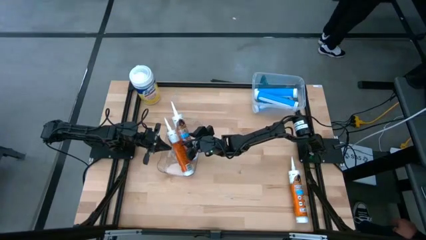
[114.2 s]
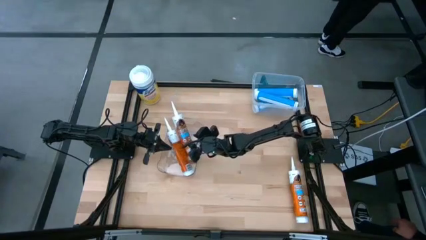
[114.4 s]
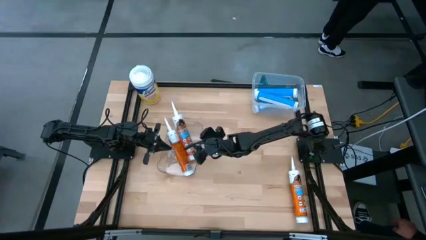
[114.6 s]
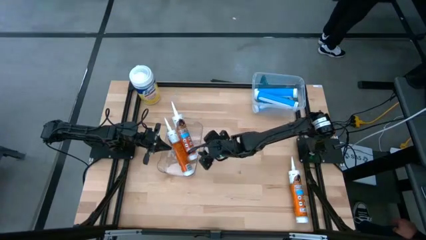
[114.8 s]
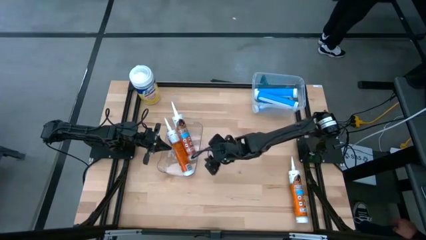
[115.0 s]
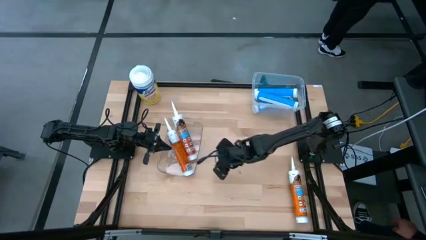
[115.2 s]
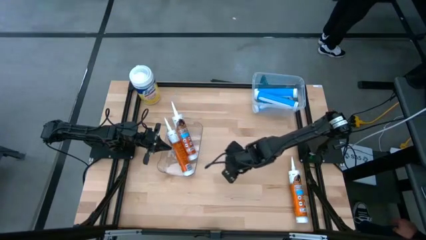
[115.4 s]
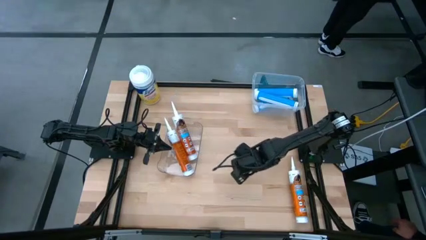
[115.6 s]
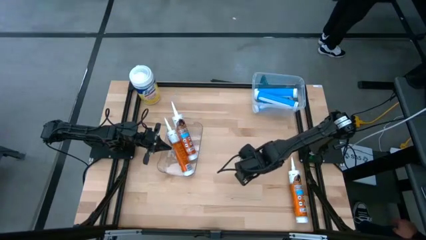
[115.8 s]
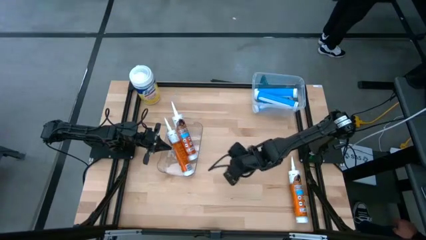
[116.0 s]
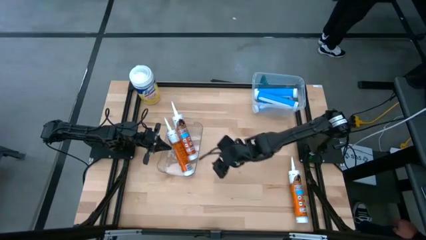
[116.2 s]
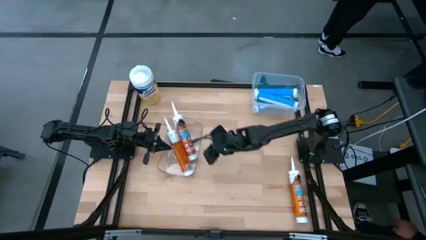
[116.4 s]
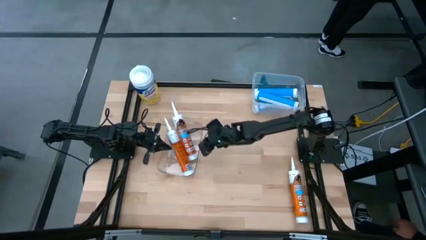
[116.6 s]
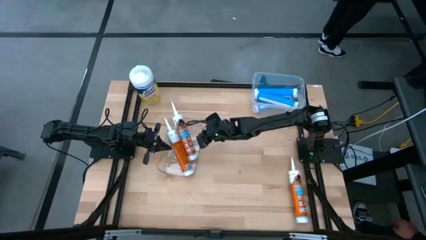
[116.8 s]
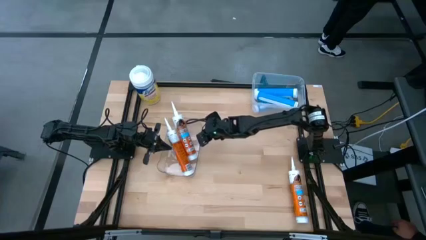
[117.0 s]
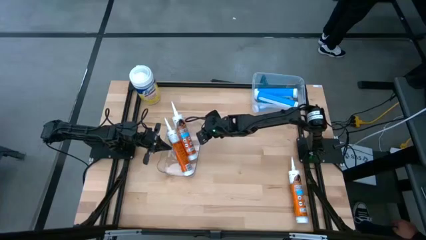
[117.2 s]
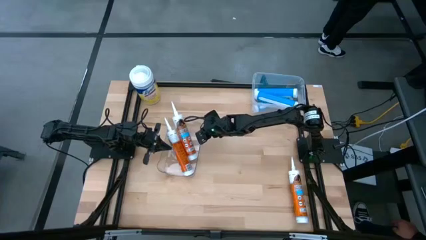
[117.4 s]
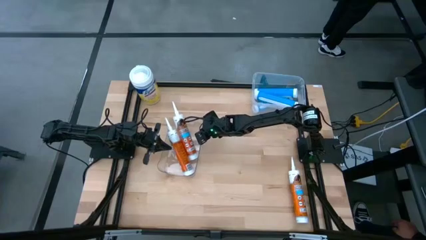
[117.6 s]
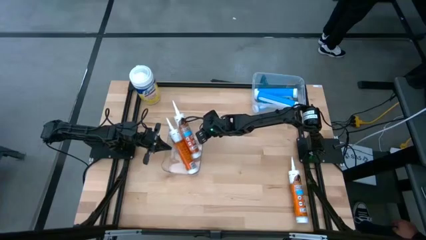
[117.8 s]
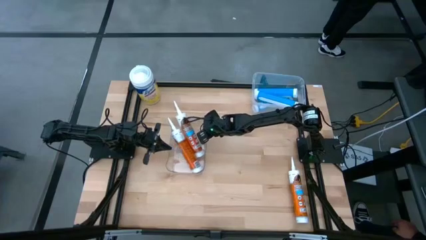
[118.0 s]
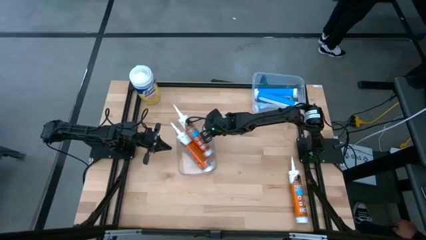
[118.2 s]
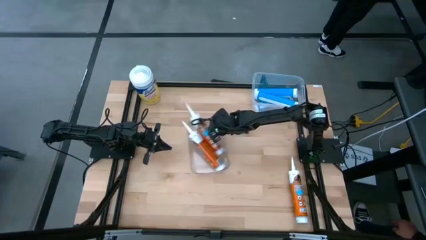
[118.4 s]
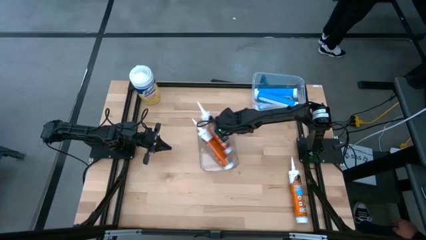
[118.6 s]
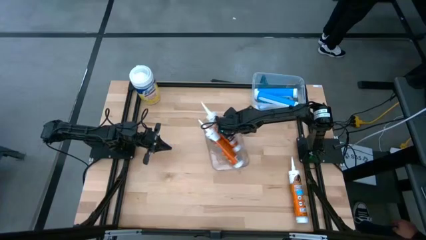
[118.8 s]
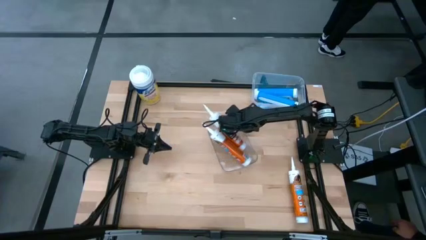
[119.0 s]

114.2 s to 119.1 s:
Task: Pick & place silicon tubes, Sealant and Lysol wipes
Move the transparent bin to the bottom left of the white bin

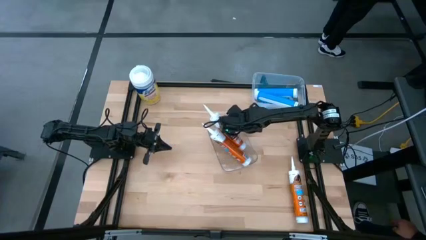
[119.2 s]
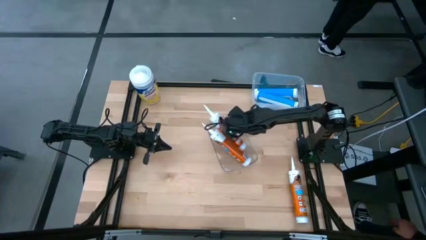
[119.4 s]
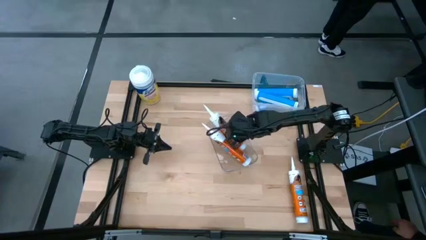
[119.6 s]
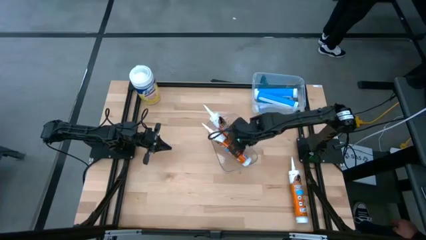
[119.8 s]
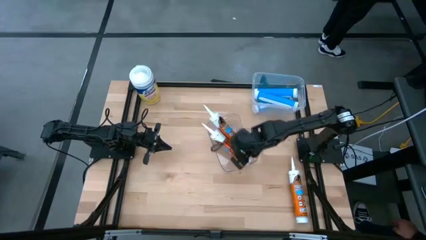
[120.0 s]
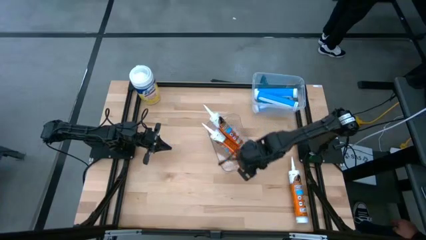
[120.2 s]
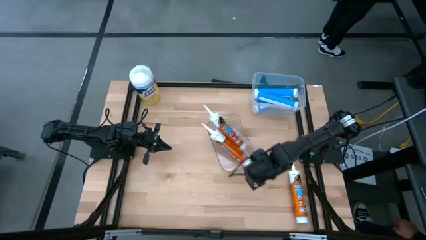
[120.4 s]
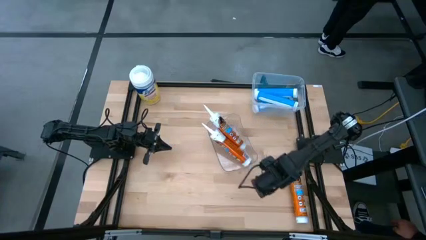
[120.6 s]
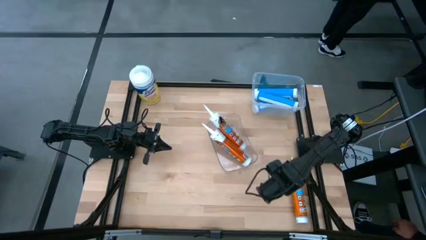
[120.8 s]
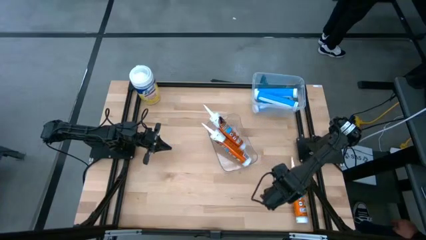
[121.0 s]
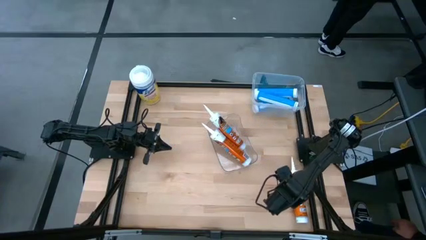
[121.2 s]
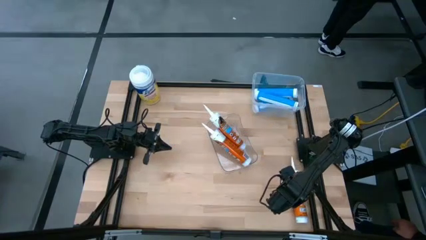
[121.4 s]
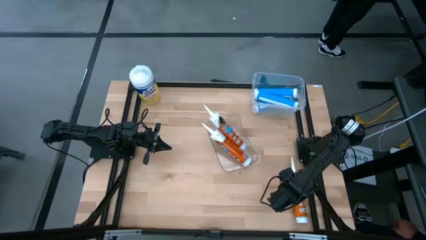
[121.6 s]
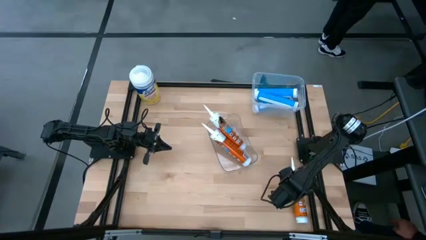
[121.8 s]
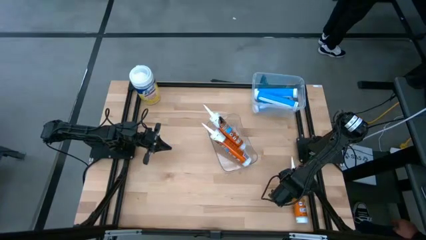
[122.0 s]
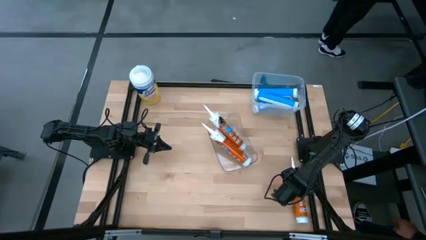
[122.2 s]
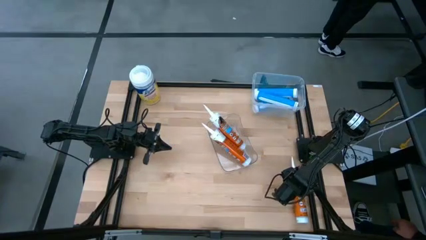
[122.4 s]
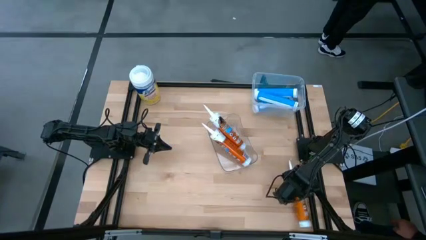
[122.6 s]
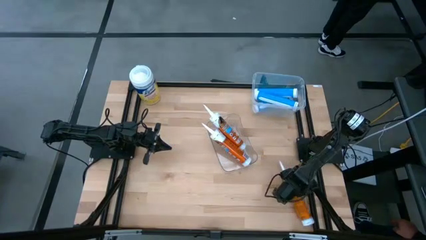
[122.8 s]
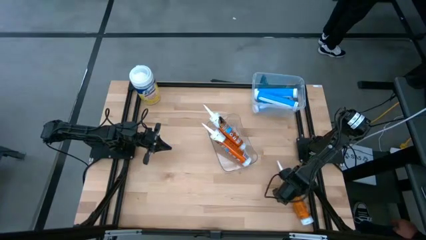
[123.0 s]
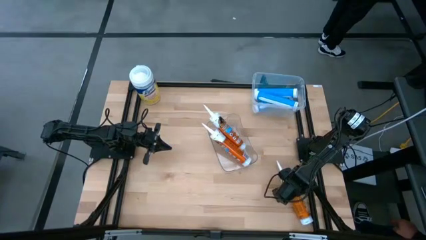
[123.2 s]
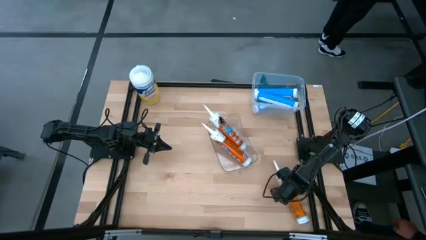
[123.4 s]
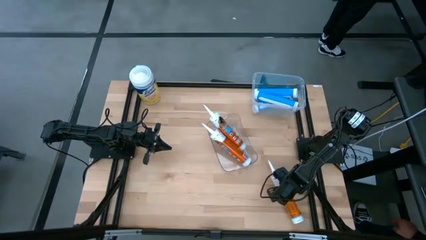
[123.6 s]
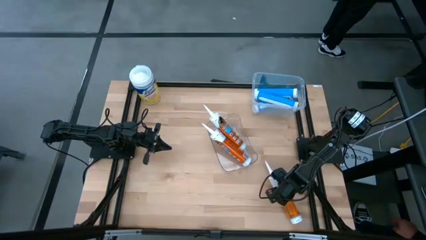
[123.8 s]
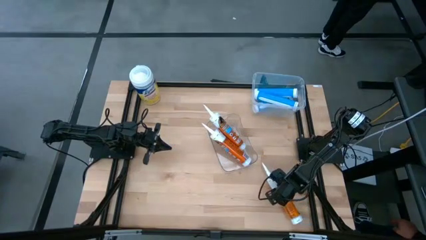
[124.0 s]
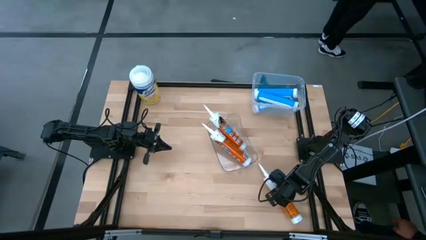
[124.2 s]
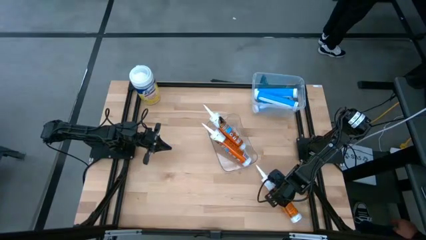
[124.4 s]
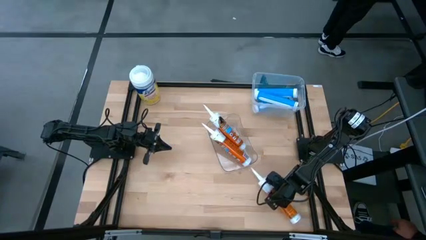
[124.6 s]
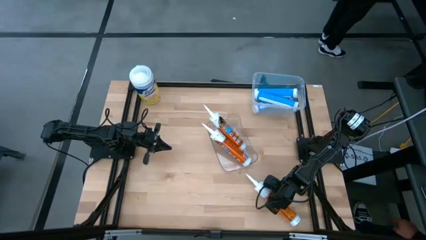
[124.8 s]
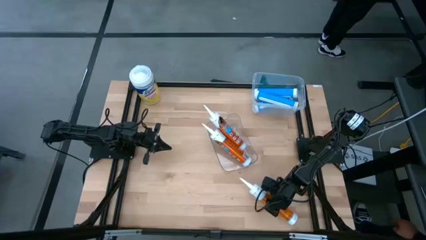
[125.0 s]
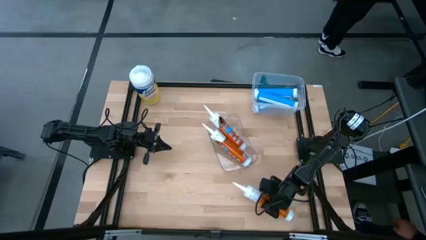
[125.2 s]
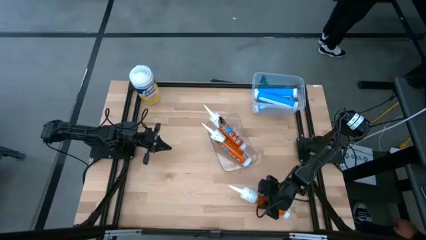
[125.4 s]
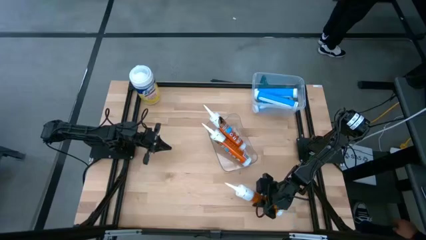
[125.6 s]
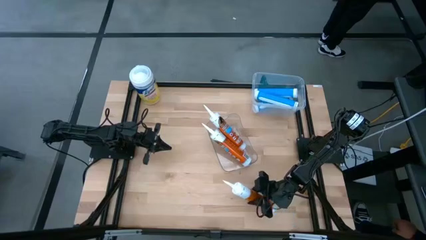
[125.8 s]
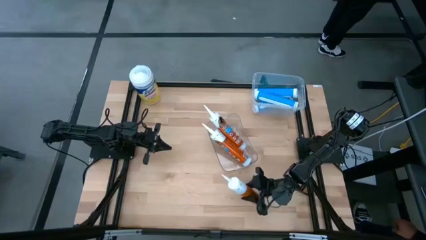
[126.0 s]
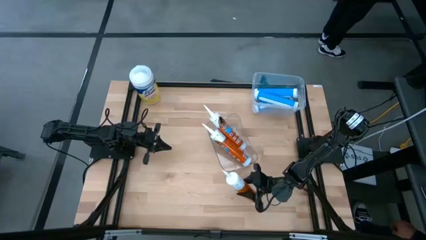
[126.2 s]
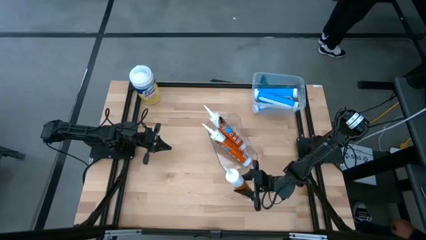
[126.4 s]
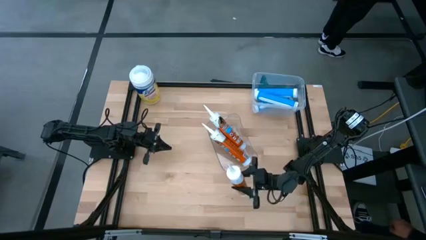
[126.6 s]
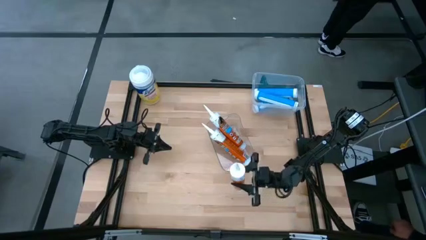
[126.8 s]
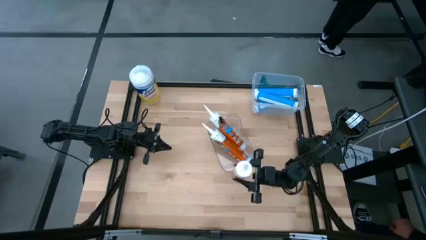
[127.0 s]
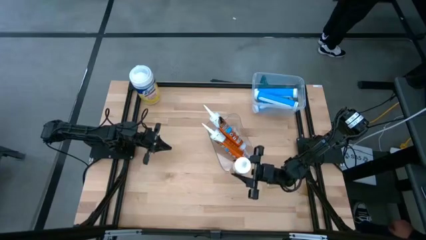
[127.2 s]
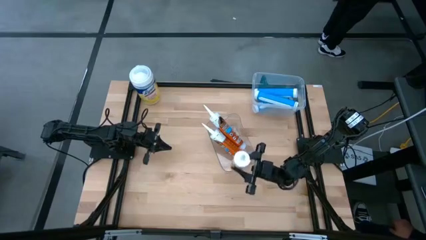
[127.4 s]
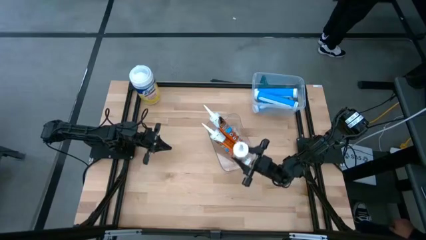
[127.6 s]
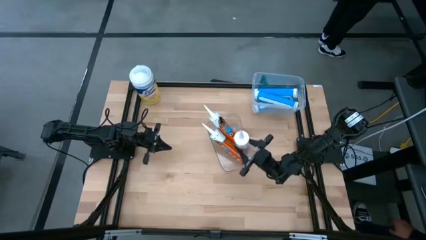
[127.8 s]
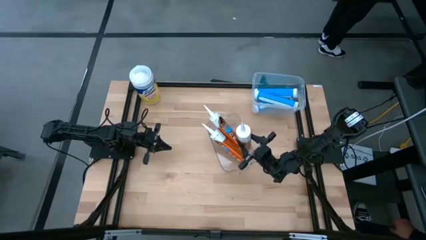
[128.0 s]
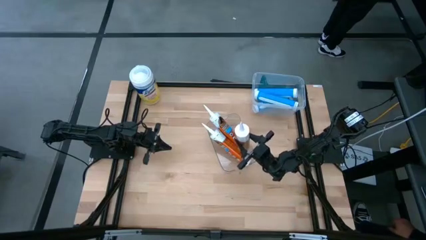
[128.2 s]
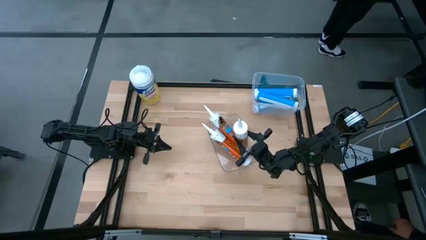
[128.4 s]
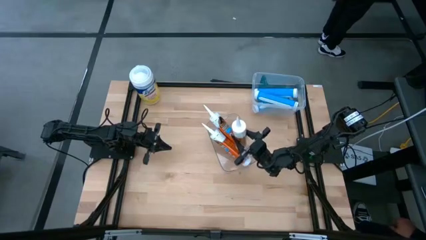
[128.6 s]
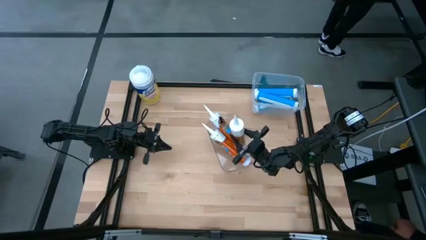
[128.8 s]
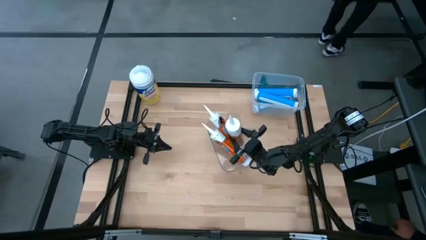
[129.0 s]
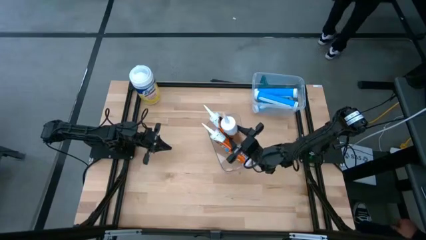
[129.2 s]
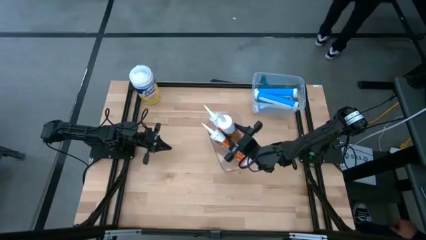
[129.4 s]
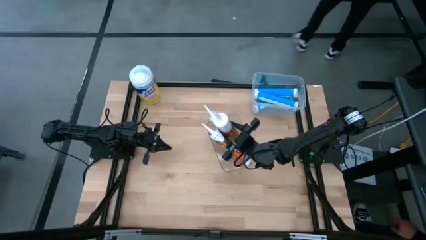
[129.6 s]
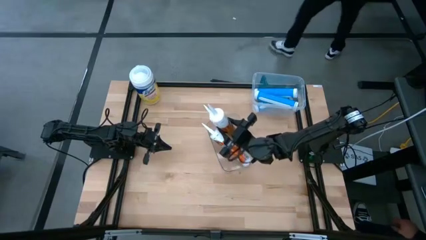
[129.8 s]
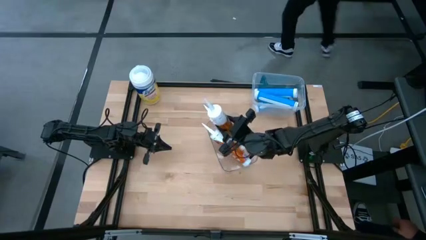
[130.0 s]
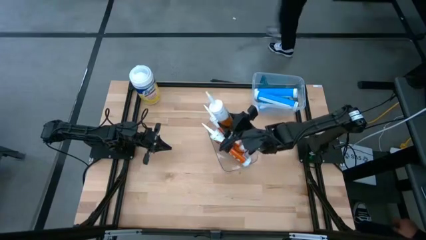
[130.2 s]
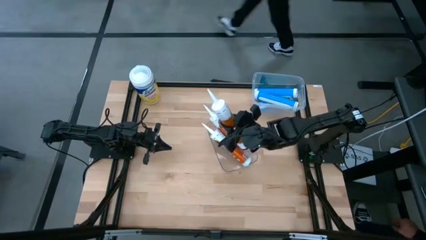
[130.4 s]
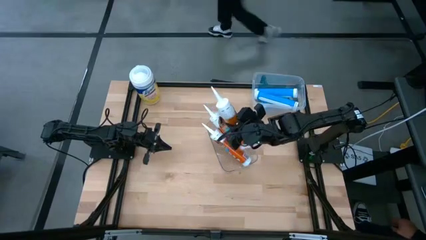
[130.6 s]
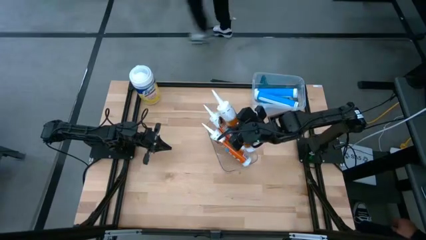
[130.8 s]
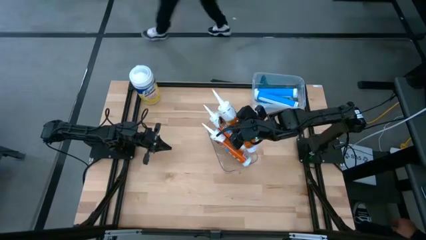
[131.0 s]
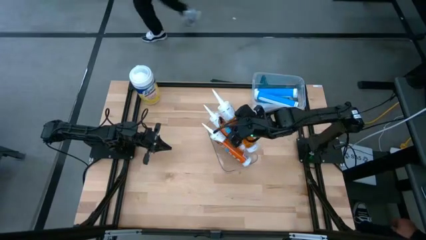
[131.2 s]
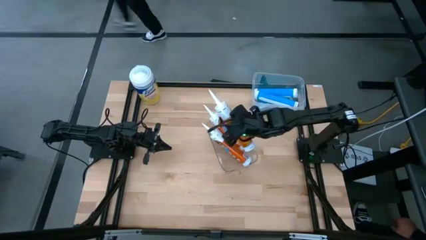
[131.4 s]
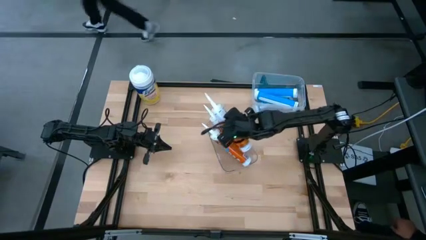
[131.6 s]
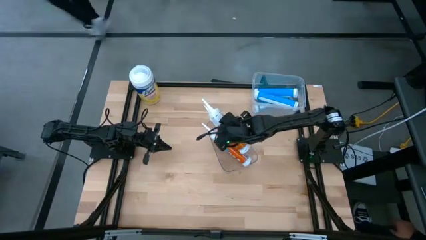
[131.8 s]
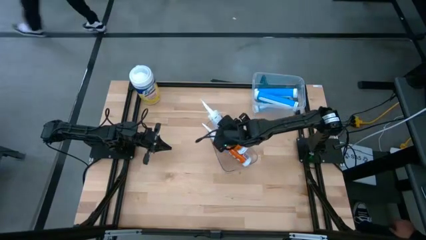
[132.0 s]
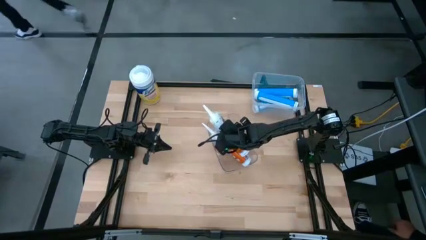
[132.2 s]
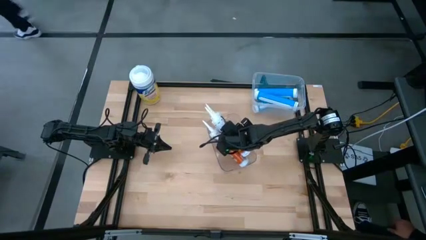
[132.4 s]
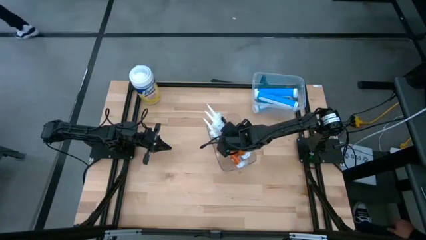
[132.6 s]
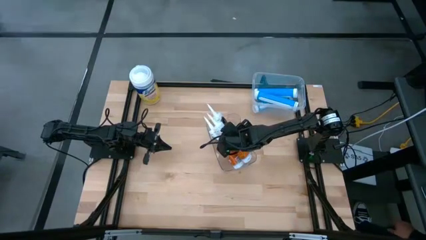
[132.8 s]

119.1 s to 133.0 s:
Put the orange sealant into the transparent bin
